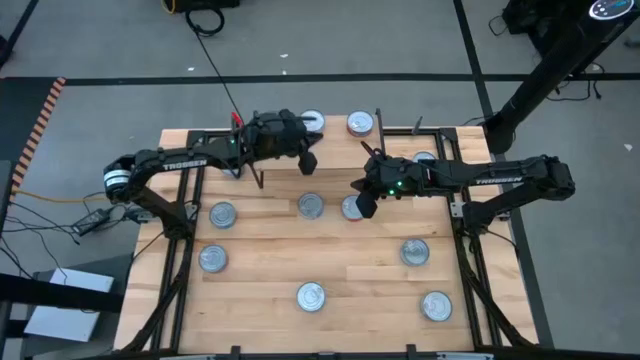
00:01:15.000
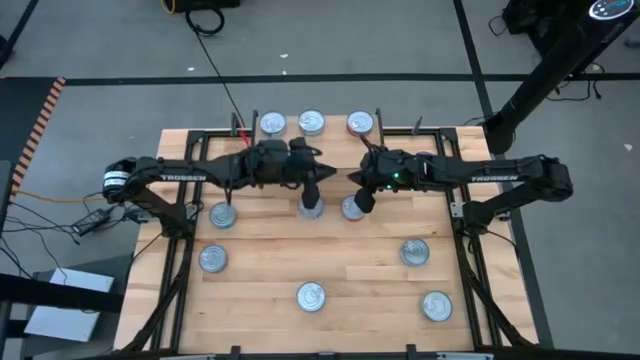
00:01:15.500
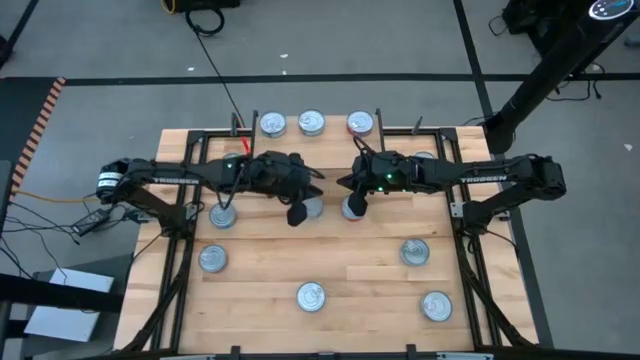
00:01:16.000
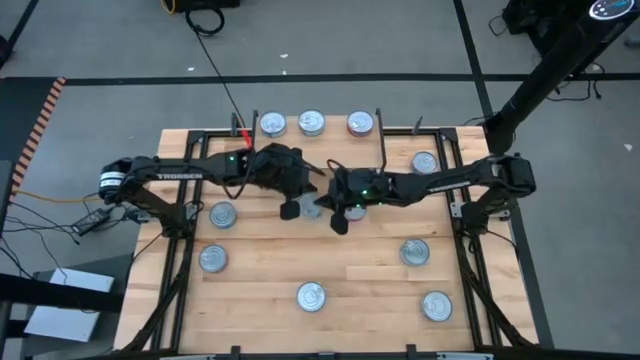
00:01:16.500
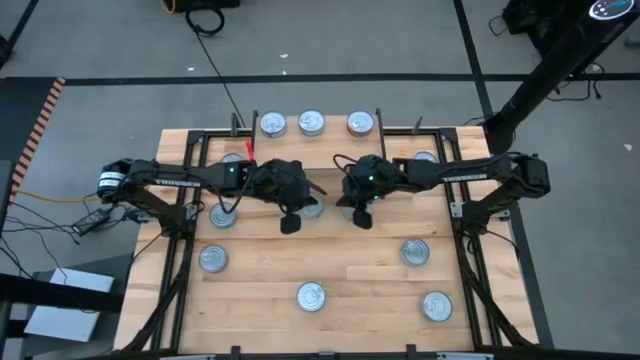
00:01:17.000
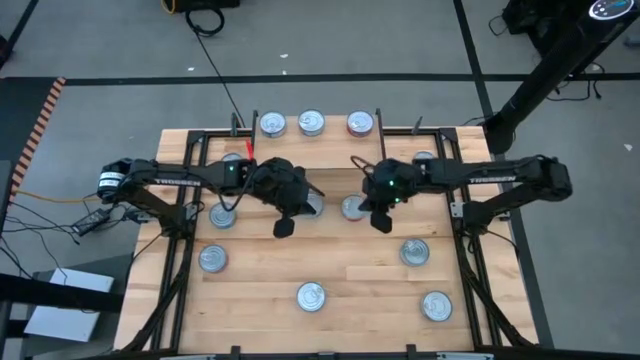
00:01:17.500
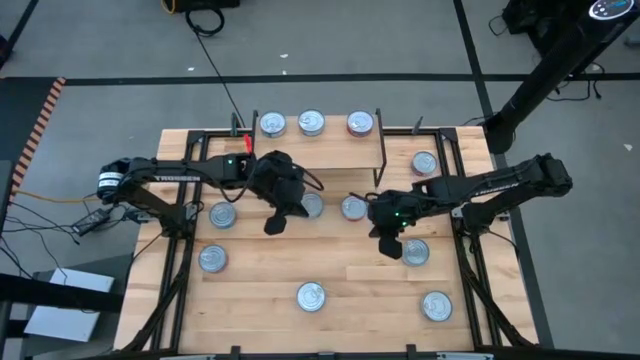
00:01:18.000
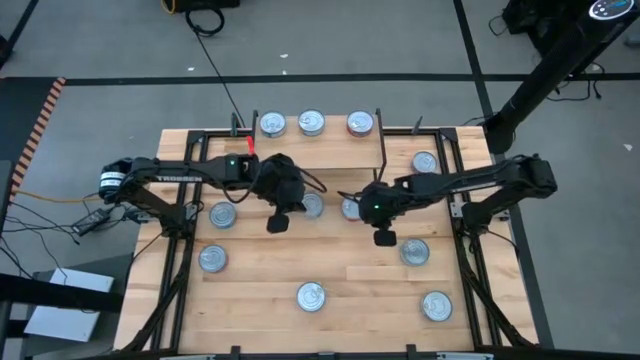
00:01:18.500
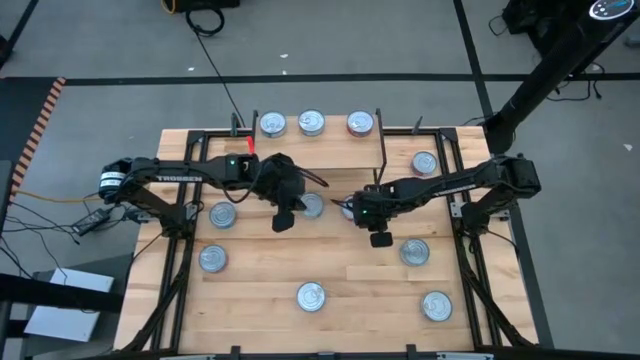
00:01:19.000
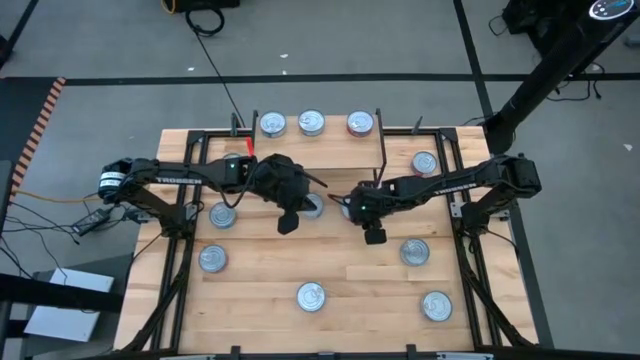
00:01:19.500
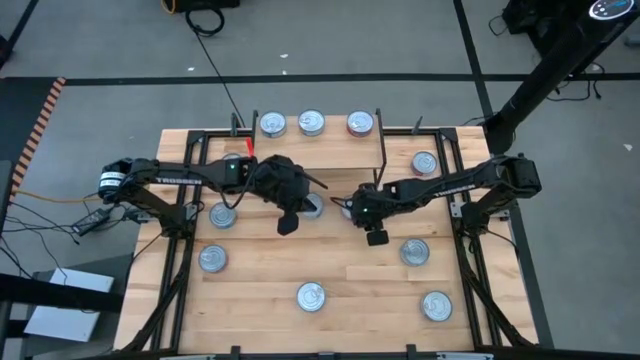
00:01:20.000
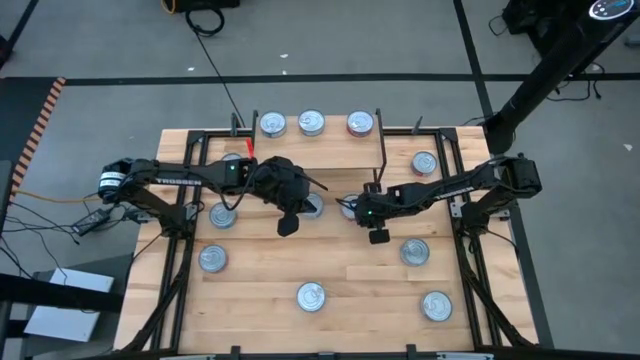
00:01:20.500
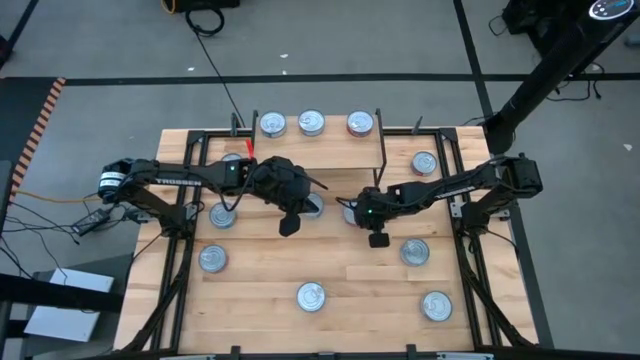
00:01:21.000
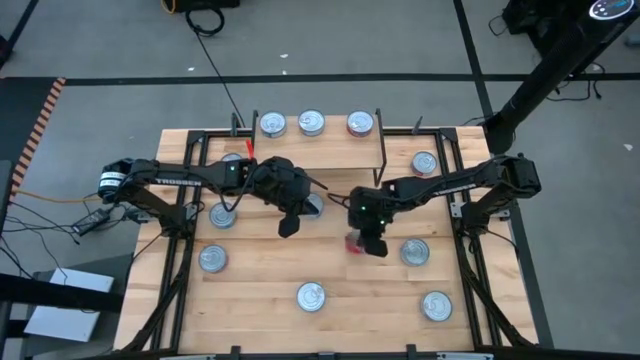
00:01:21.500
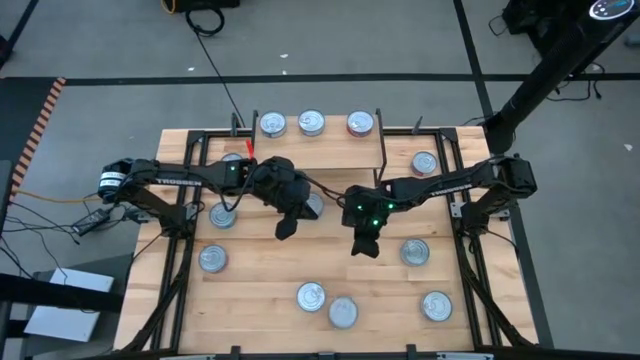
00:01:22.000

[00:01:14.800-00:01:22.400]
Task: Stack canned seafood by type on shelf
Put the red tuna can on the shelf

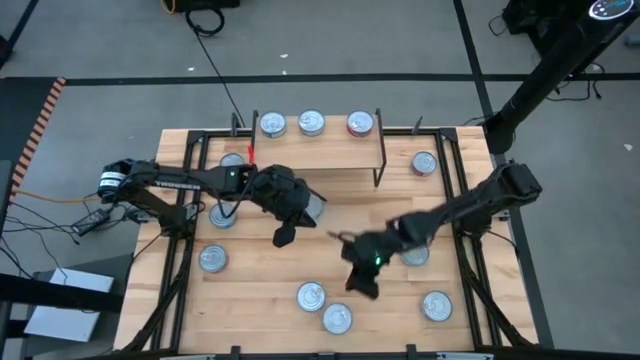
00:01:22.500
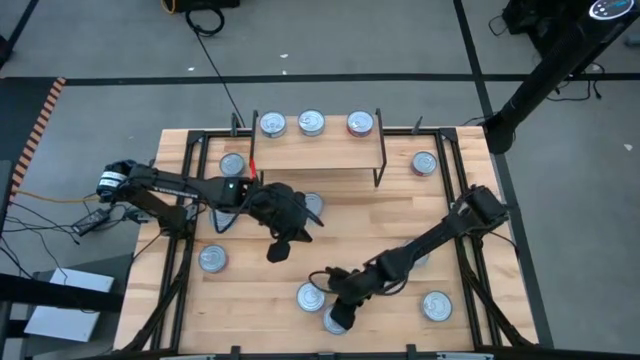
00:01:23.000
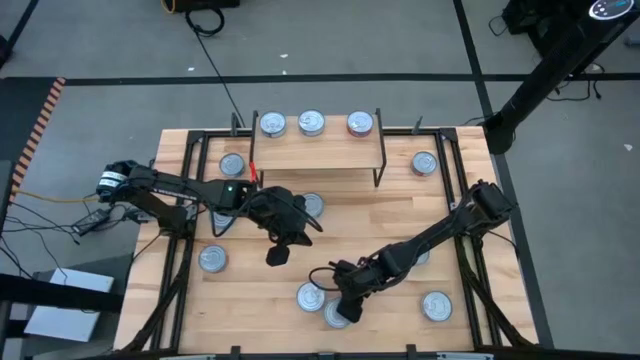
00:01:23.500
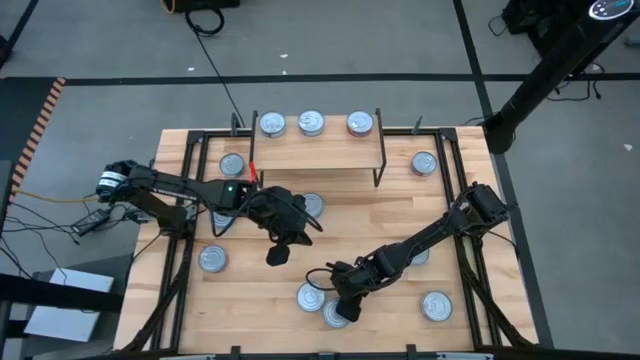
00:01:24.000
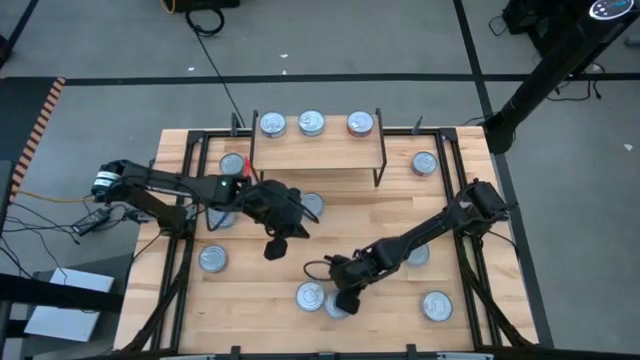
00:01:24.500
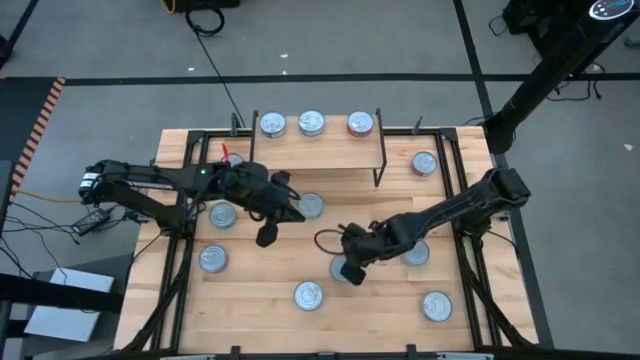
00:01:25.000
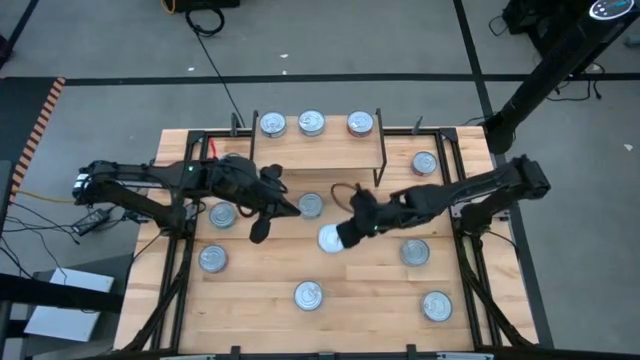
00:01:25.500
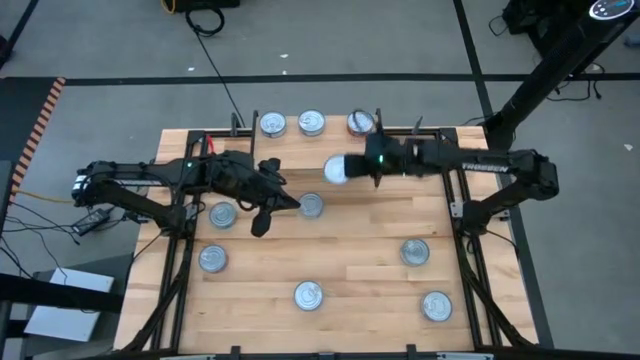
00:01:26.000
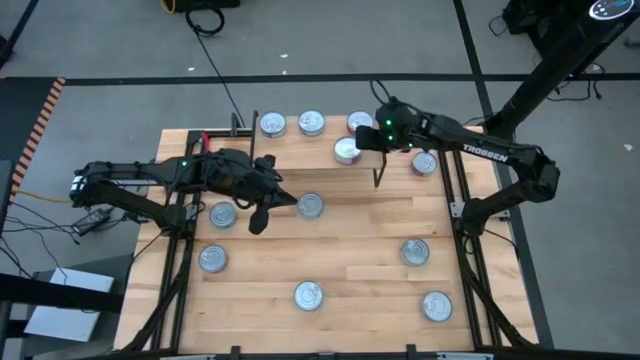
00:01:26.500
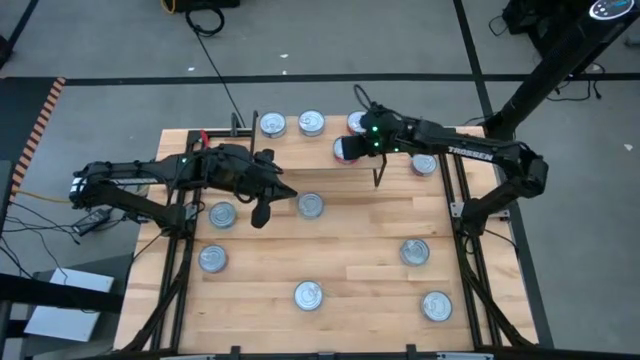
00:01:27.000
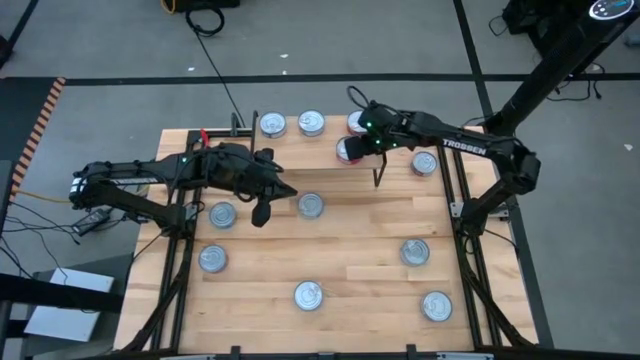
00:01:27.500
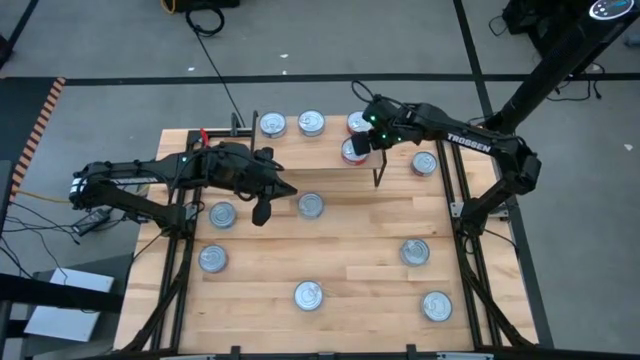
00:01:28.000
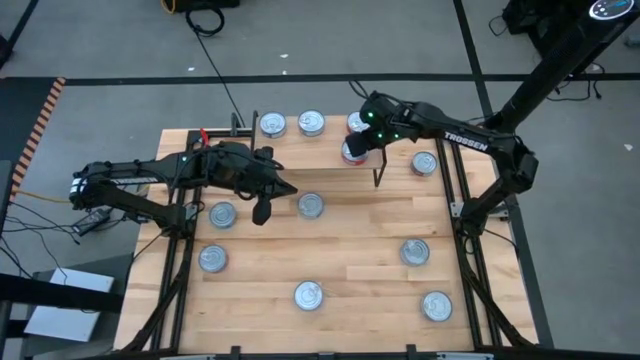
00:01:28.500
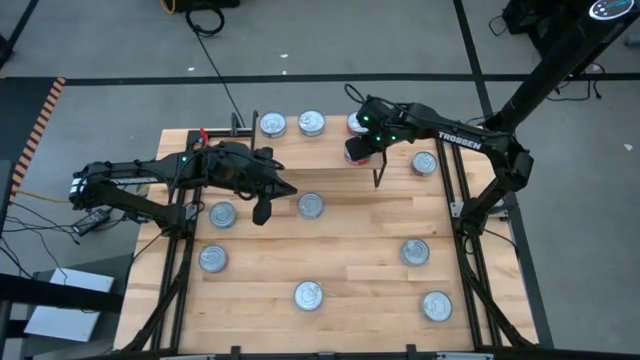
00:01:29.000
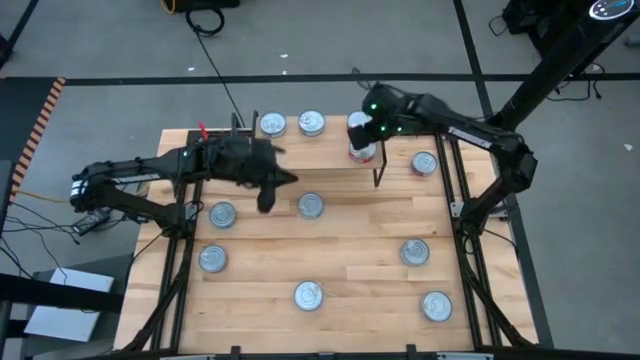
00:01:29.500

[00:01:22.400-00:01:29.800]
Put the red tuna can on the shelf

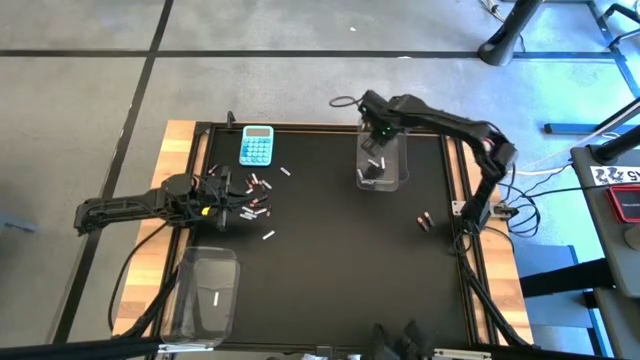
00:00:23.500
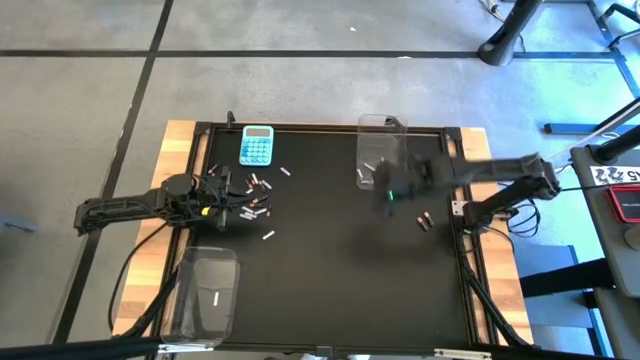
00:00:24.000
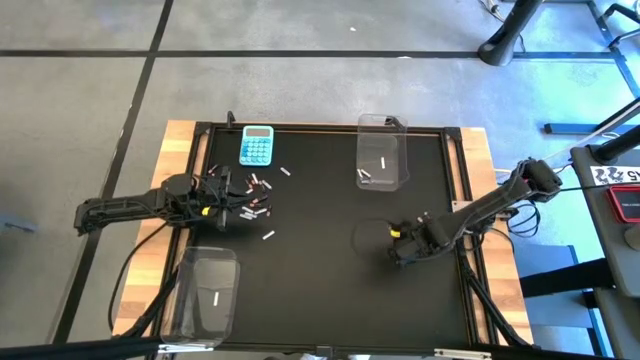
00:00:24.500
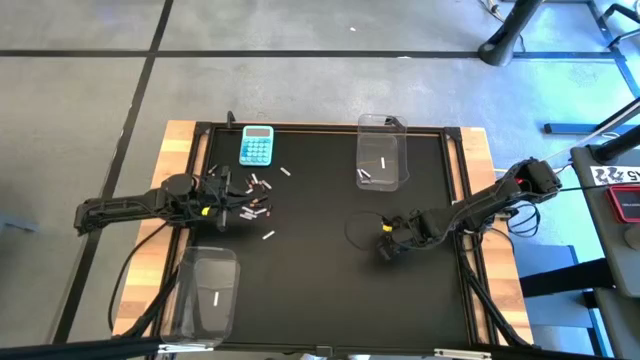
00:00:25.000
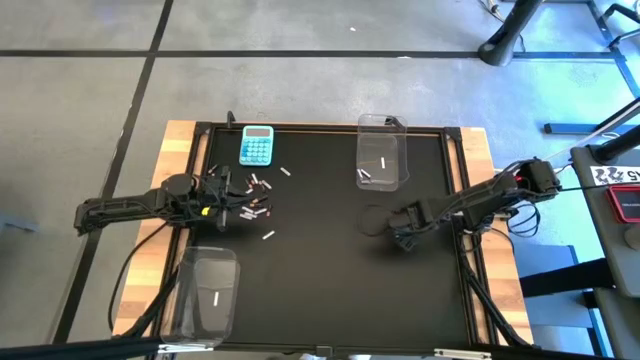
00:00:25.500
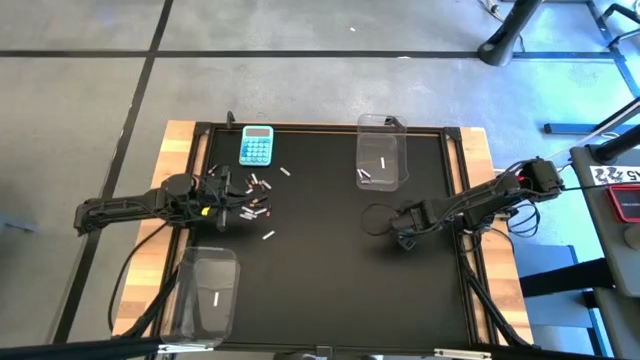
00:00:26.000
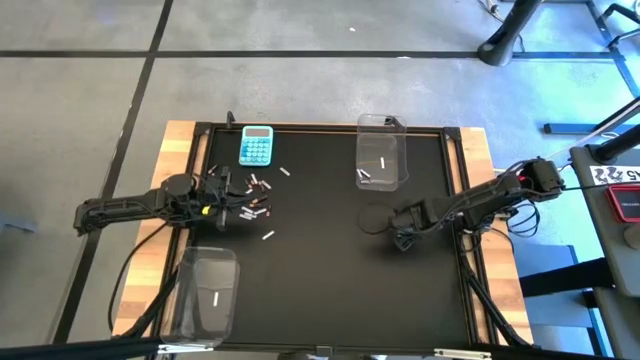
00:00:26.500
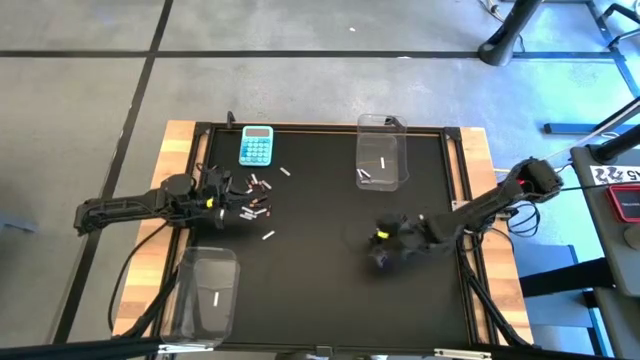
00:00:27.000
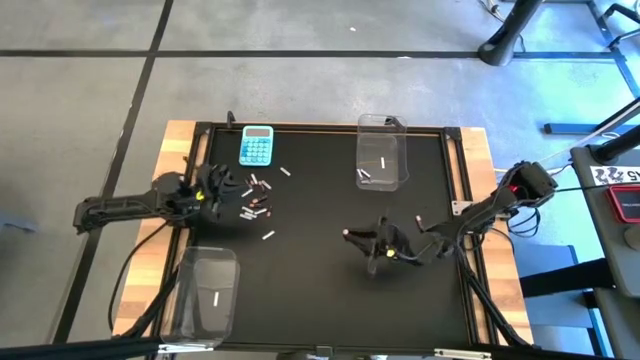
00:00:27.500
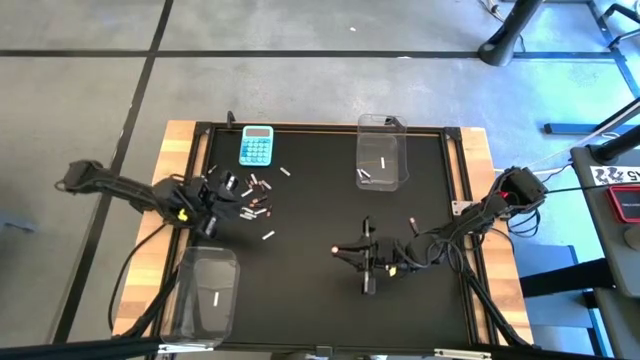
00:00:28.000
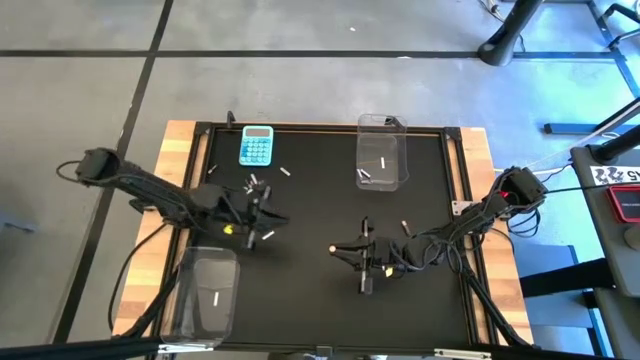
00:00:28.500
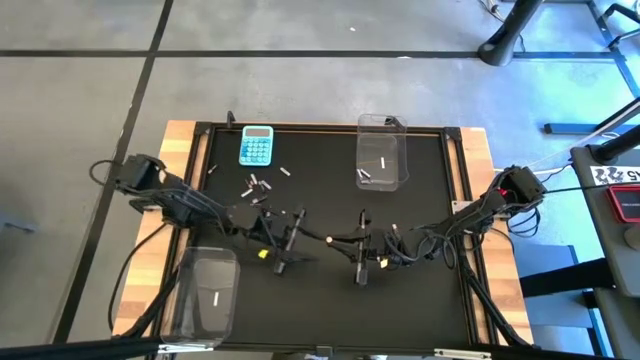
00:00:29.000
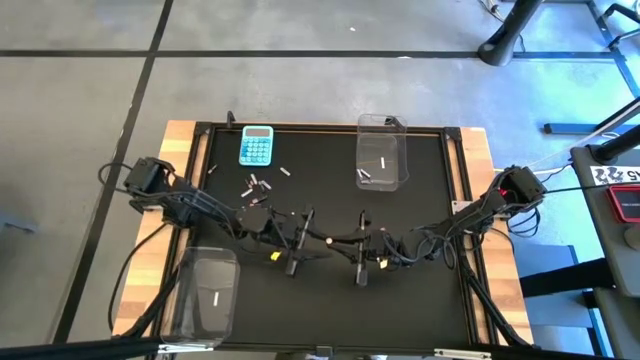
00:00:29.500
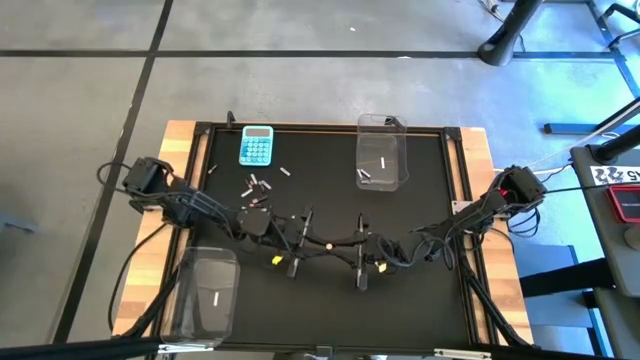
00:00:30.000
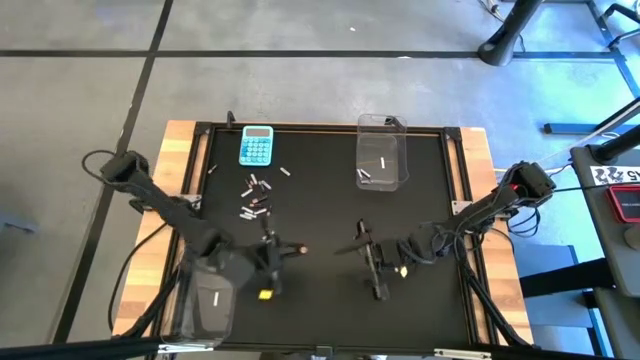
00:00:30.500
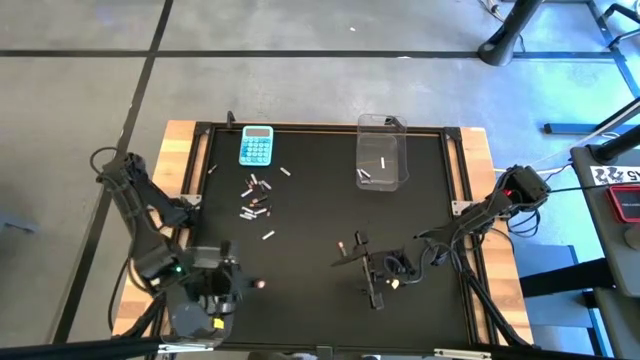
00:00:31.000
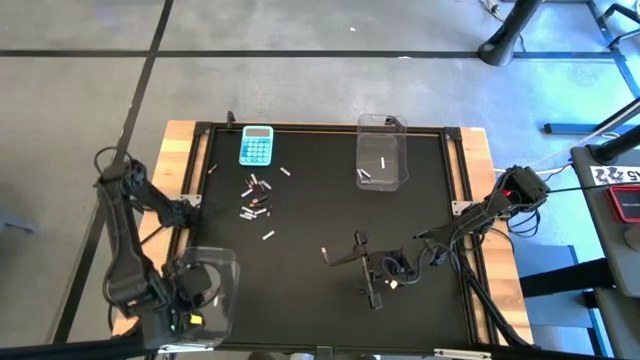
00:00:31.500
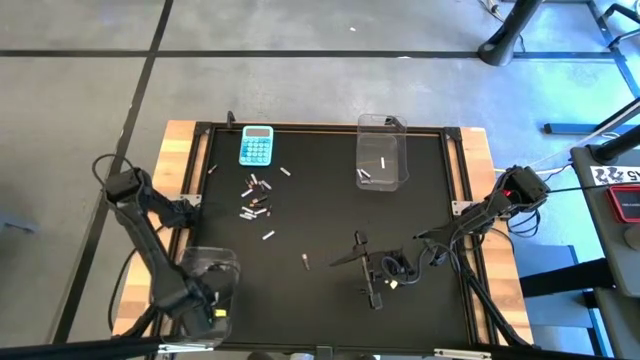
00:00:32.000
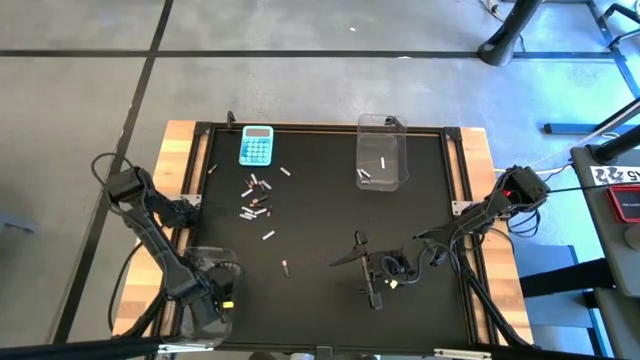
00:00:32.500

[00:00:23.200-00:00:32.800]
Task: Sort batteries
Put the black battery into the bottom transparent bin
